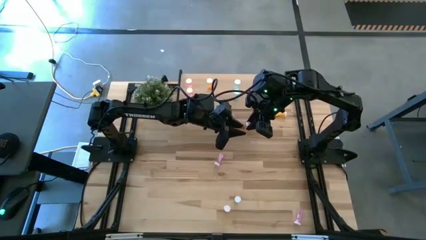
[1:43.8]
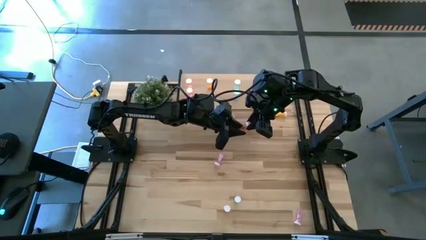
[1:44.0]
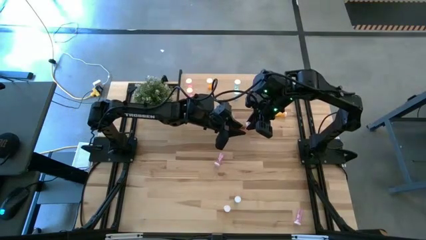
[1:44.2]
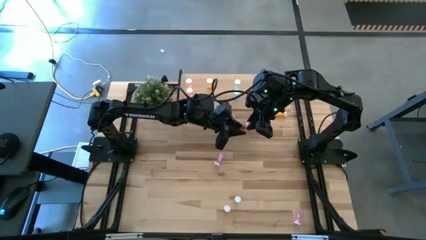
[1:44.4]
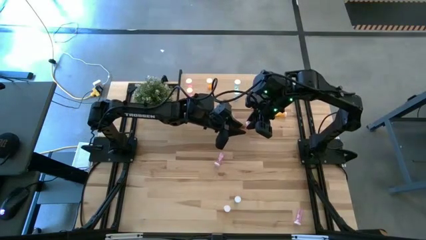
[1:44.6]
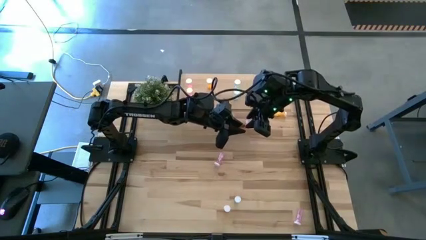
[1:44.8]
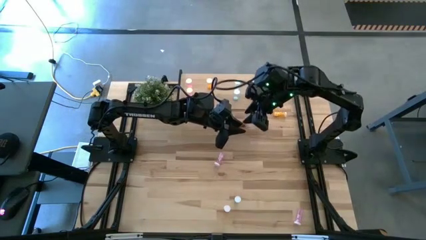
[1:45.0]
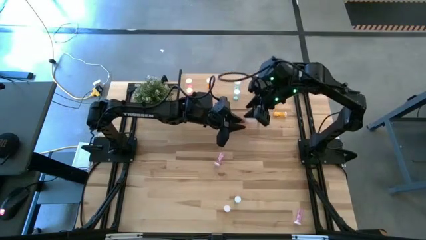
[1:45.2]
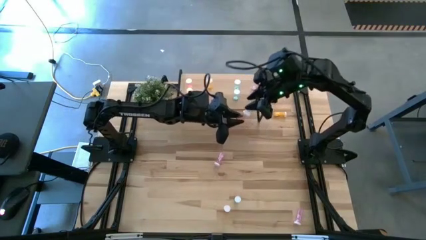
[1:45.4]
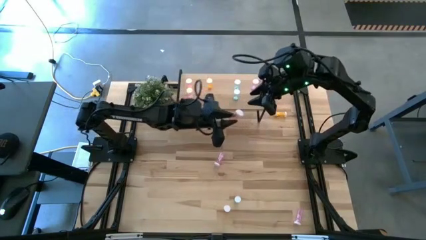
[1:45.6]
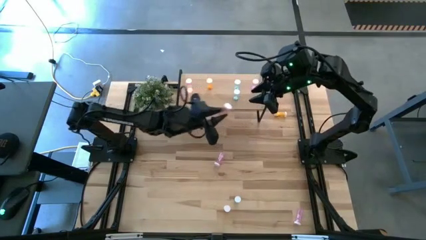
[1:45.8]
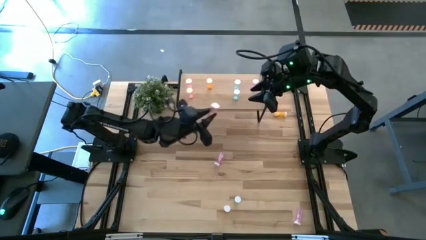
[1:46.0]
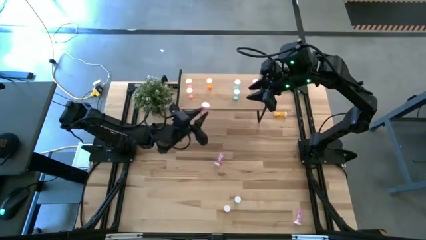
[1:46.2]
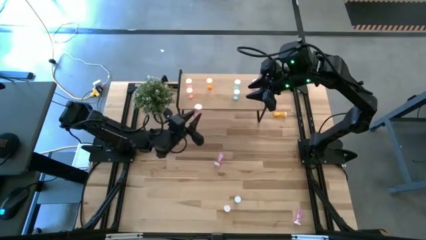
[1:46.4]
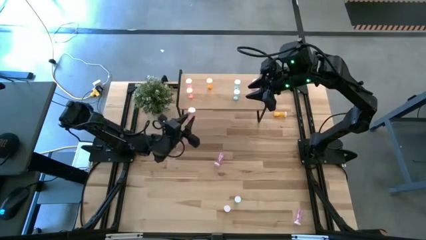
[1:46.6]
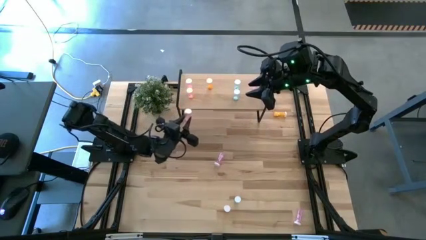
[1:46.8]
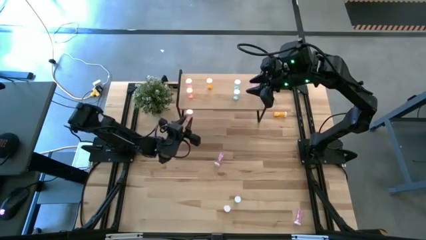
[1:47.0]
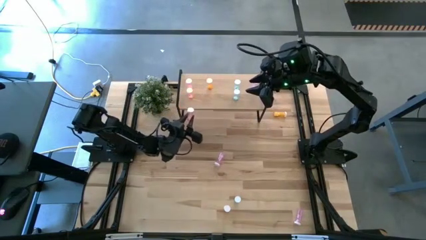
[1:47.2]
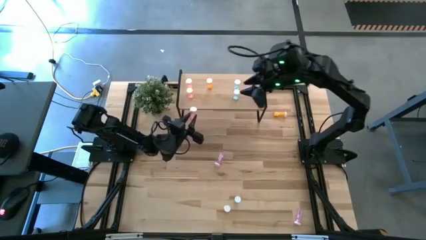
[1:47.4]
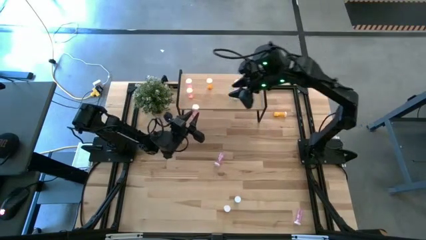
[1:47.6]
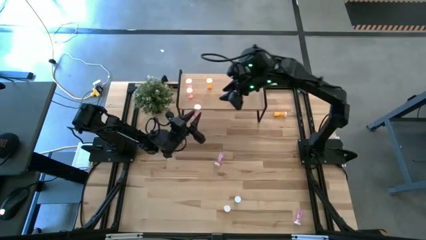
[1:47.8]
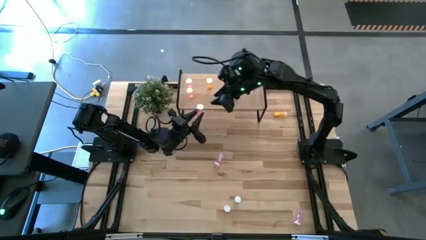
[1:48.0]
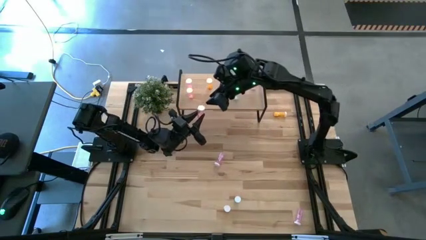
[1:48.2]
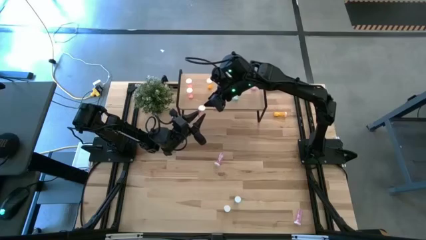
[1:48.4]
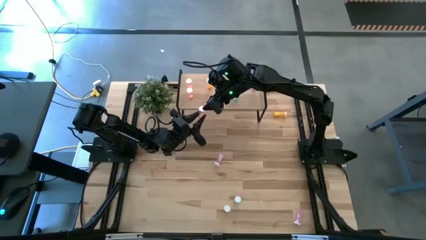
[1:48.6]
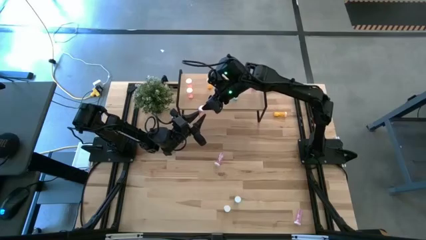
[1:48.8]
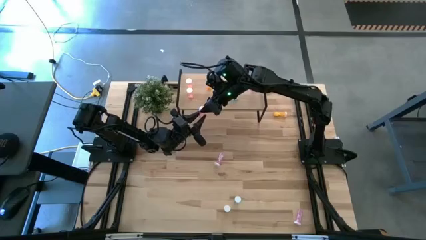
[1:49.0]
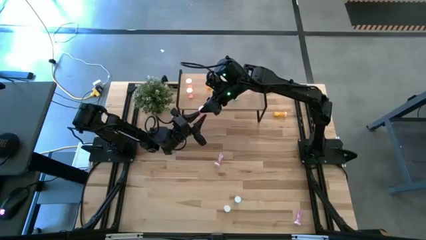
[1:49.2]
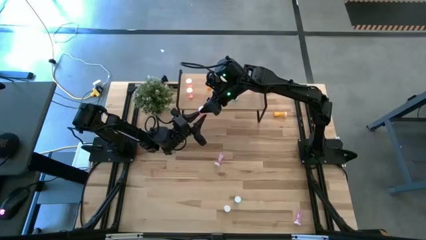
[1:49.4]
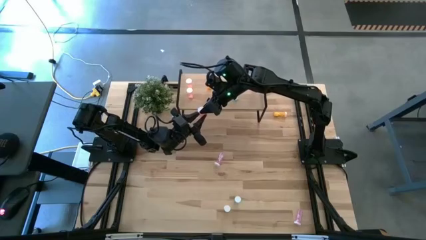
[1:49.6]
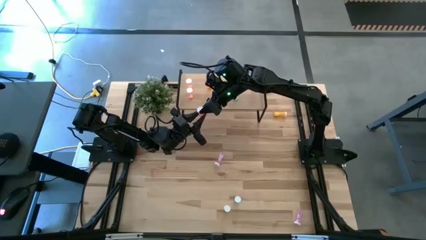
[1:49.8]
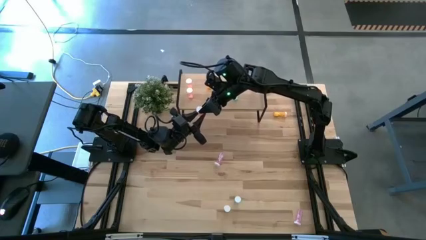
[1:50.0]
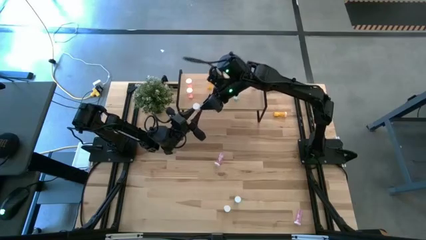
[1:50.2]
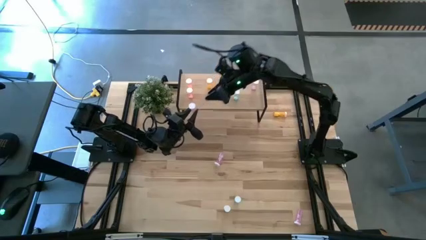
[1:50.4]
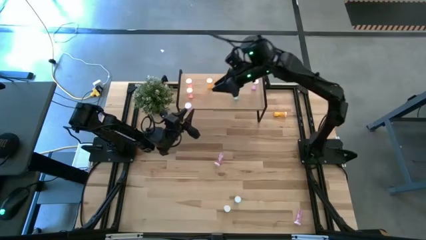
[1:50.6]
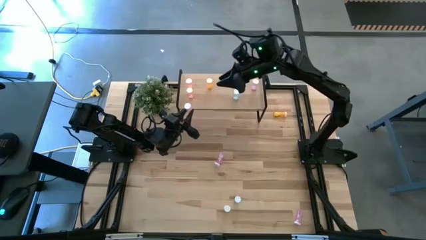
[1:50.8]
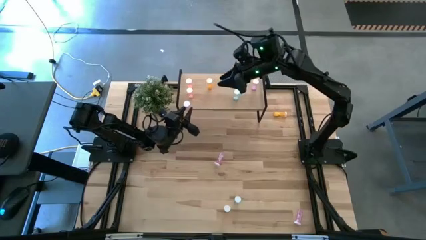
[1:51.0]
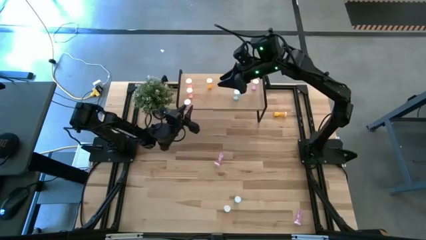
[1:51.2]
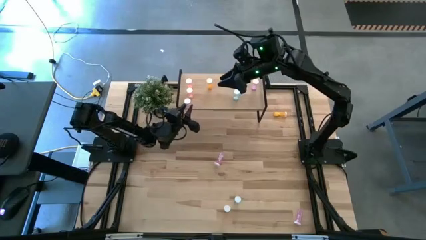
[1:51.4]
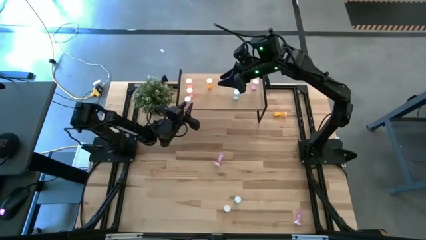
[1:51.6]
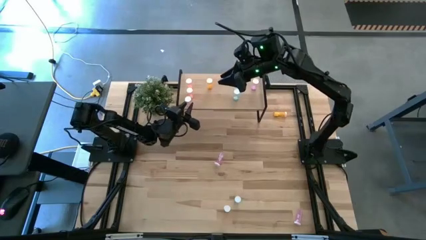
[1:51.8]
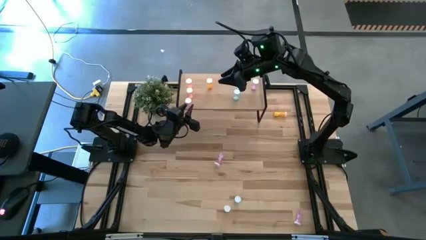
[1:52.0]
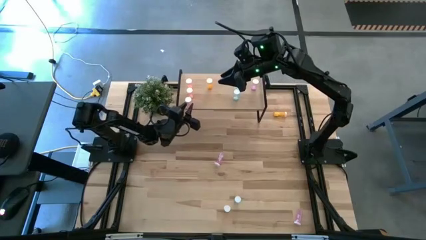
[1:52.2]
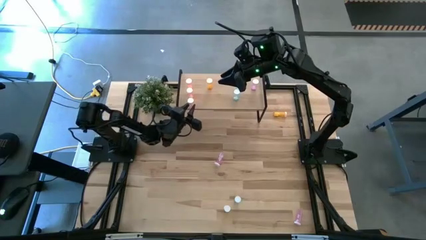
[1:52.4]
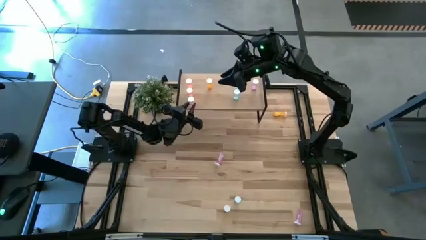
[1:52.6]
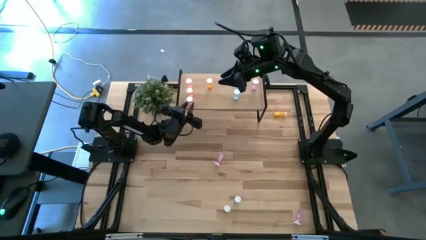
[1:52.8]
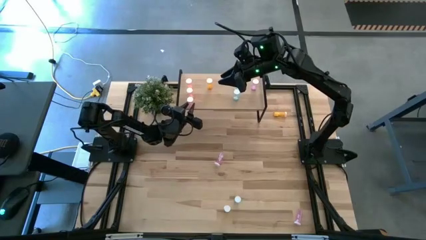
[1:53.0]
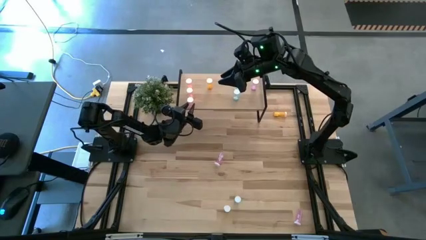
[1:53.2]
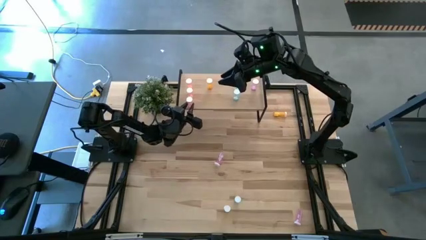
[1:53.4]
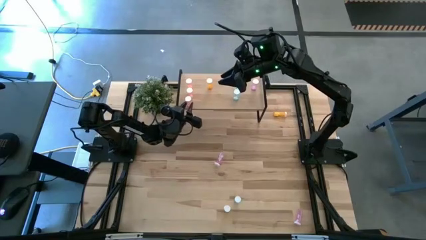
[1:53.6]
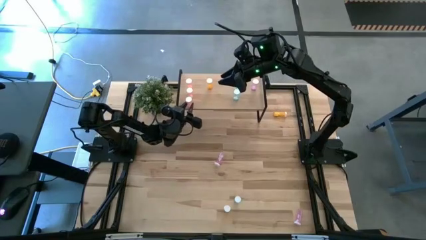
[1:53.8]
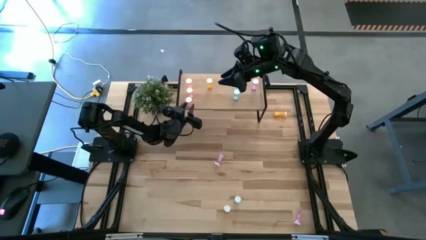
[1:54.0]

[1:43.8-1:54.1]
Task: Pick and place medicine bottles onto shelf by color
Put the pink pill bottle on the shelf aligned with the other pink pill bottles
